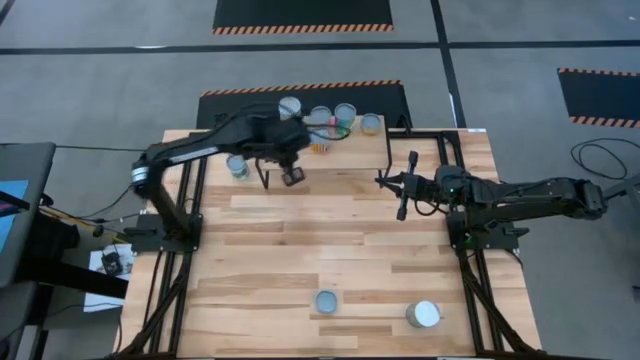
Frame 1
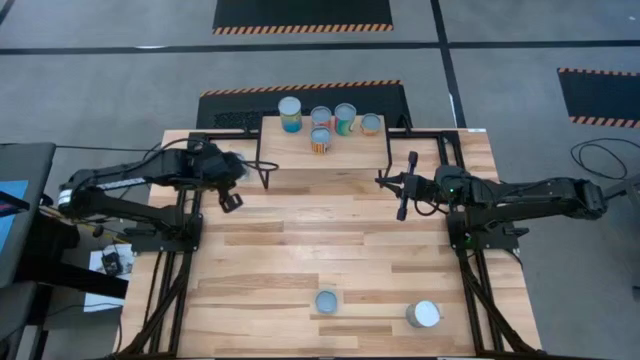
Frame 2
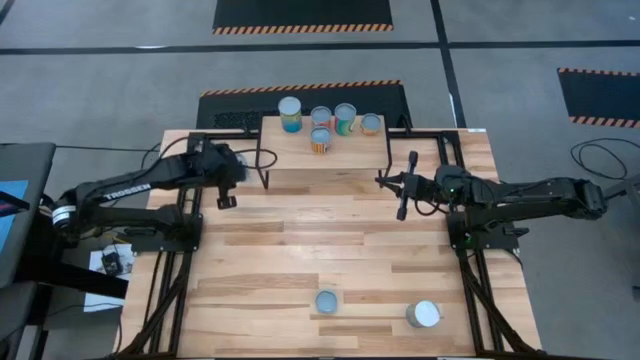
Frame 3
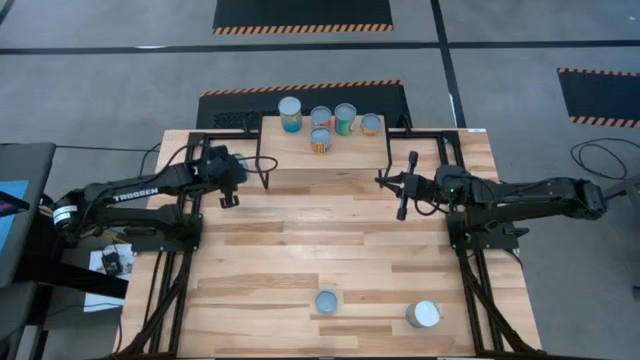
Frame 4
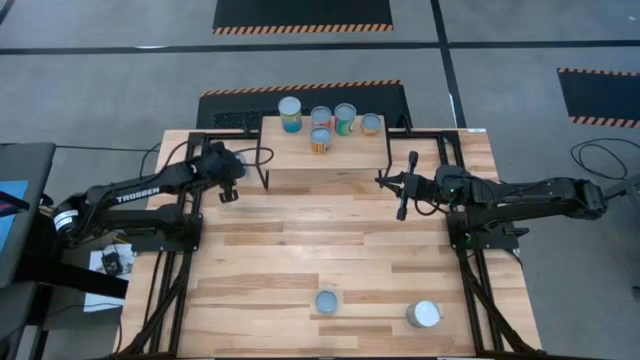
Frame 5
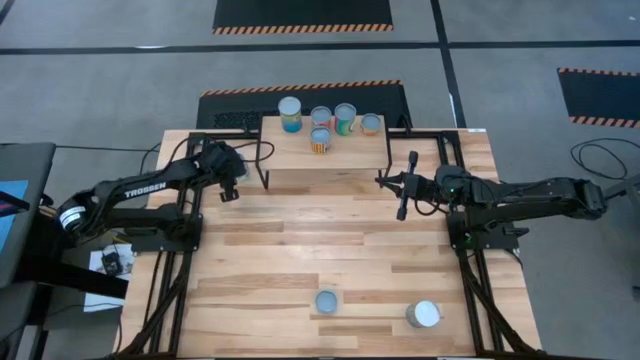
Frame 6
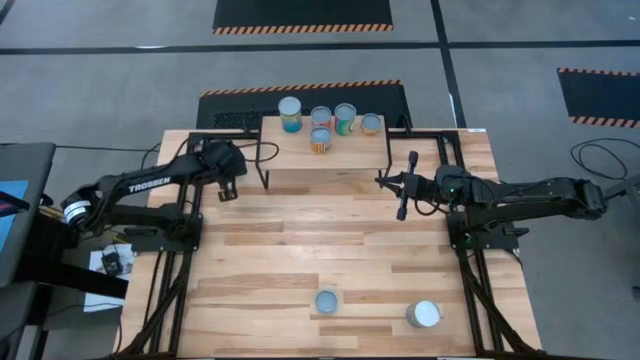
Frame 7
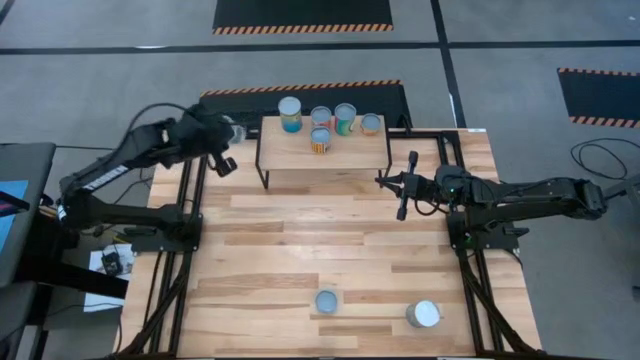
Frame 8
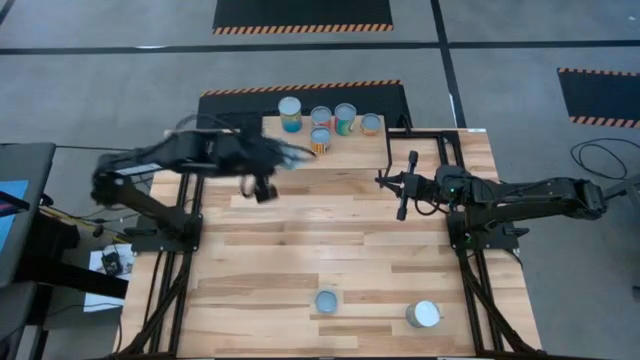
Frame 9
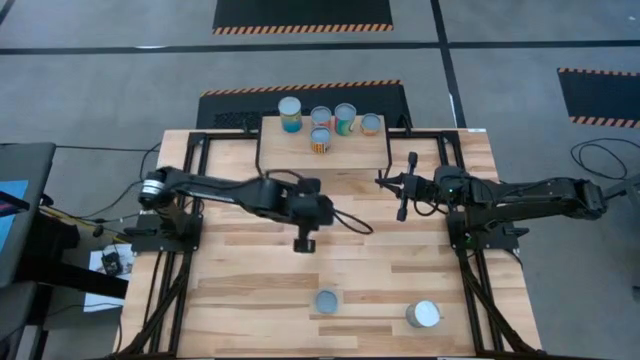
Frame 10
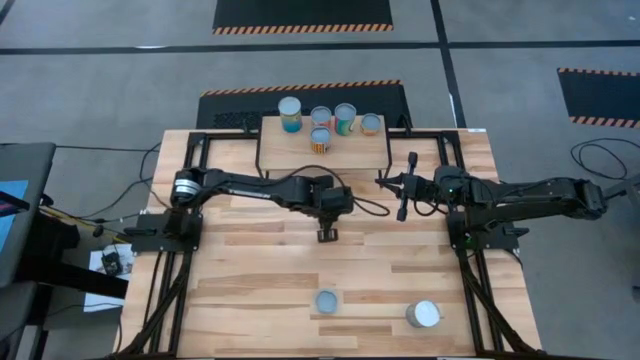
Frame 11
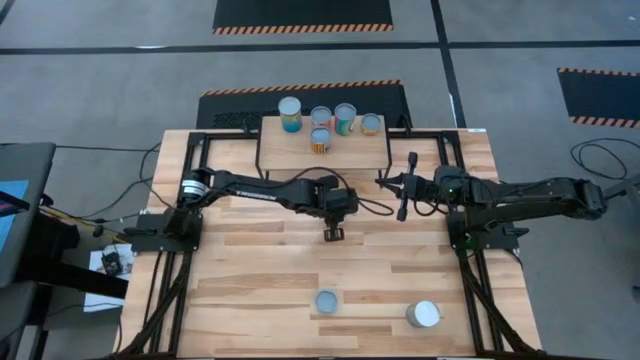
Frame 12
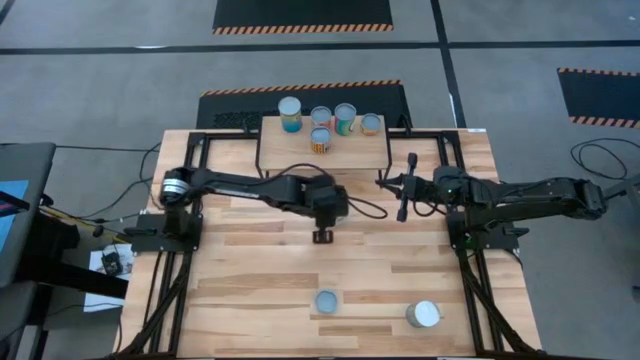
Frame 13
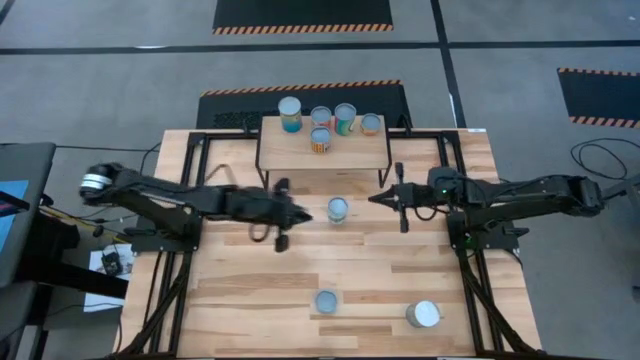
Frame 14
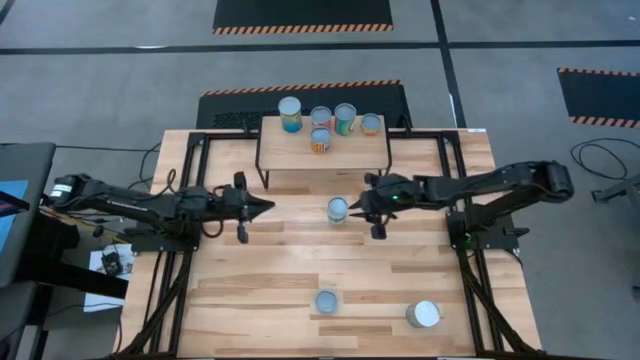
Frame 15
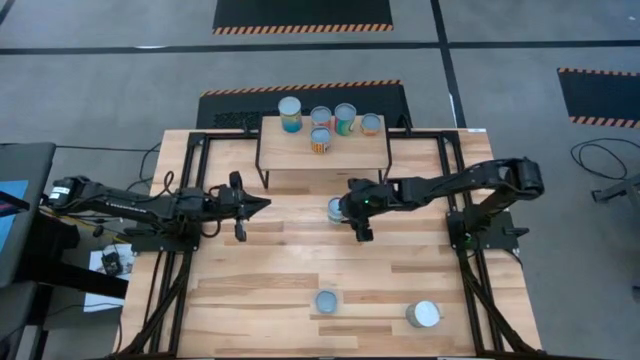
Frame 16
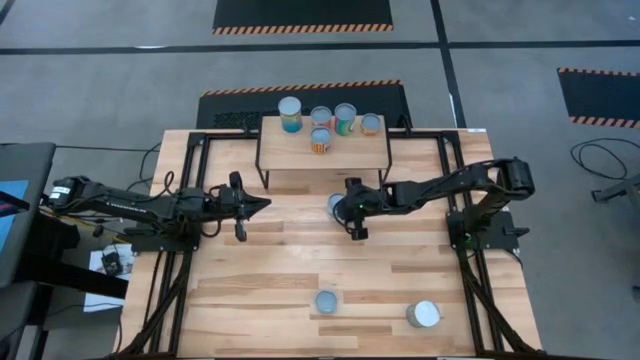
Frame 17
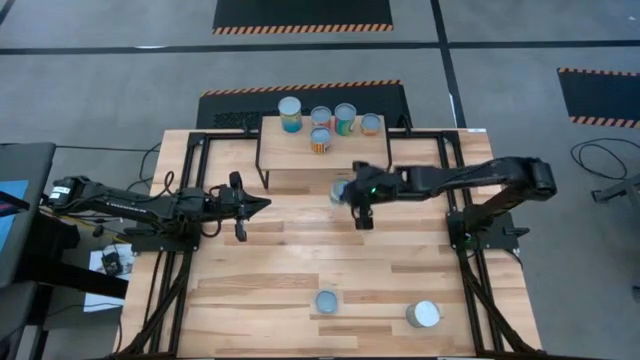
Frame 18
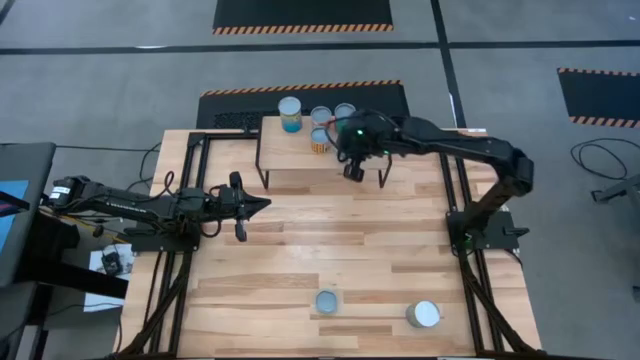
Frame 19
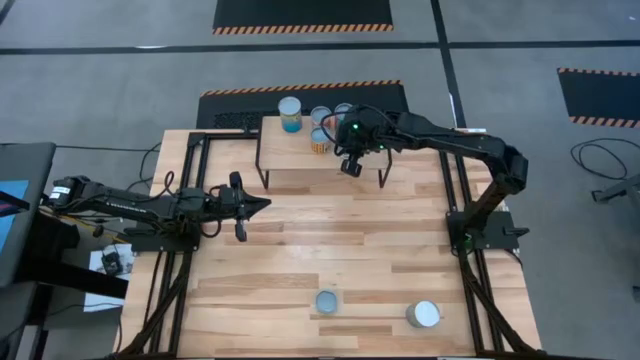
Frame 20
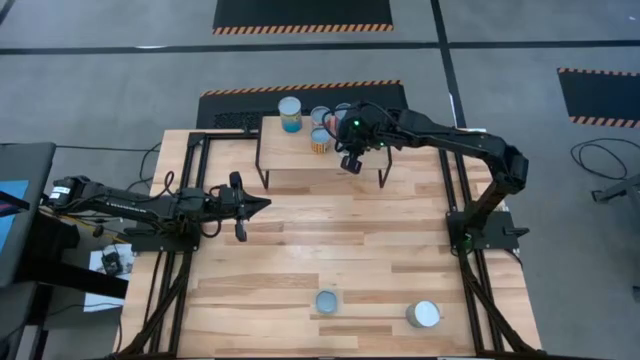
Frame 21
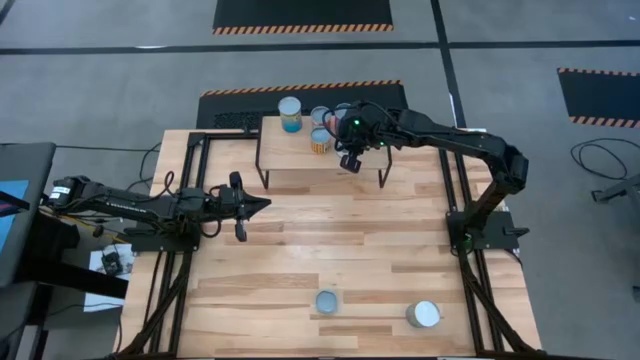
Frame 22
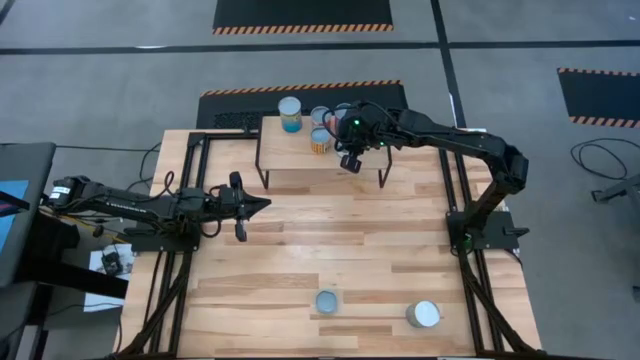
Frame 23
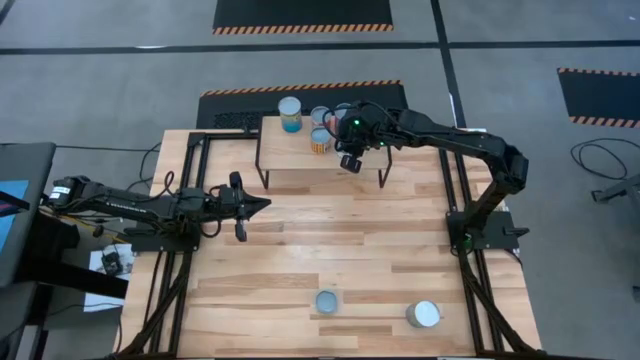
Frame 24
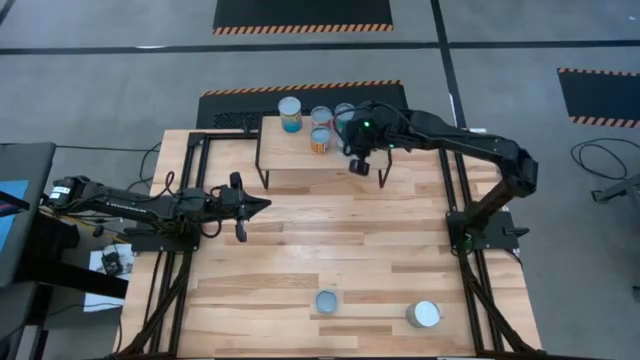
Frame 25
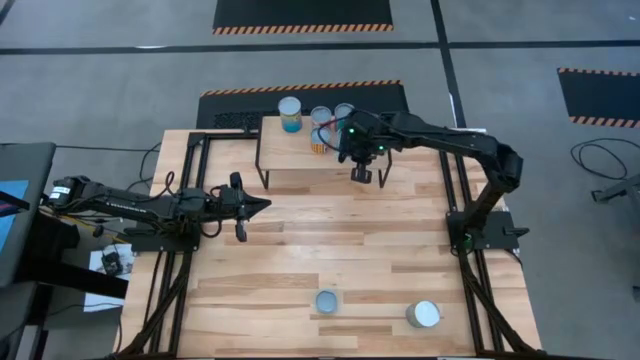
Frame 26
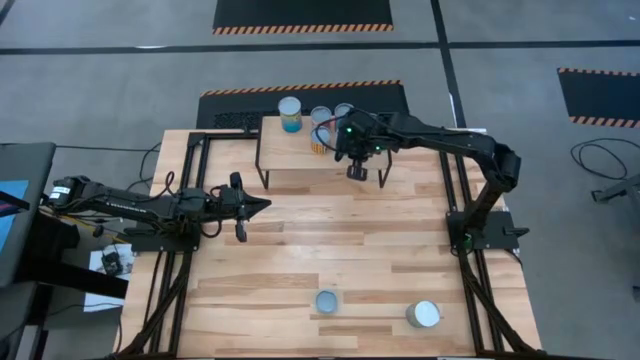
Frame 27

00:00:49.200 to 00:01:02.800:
Task: Pick and place cans onto a shelf
Put the canned mixed vegetables on the shelf

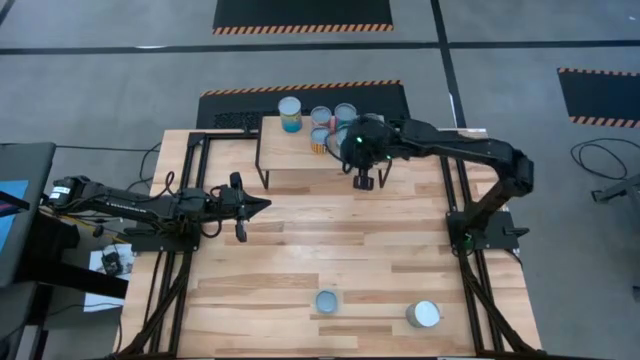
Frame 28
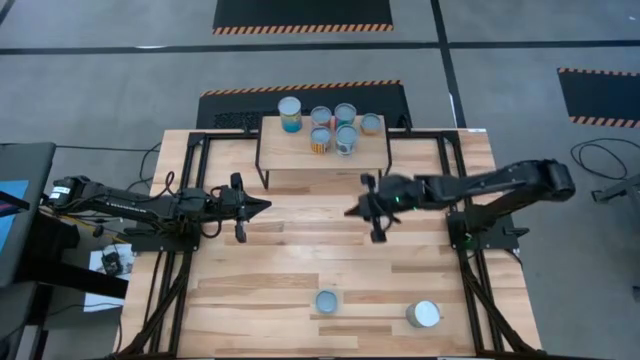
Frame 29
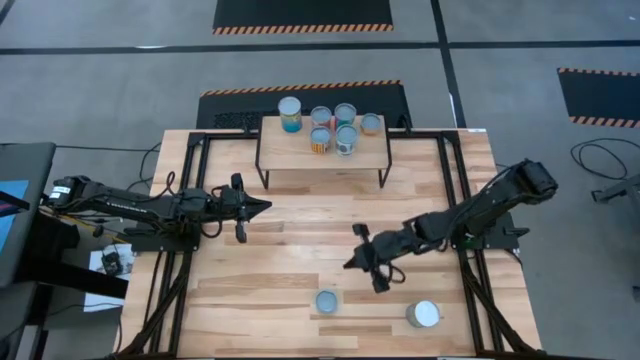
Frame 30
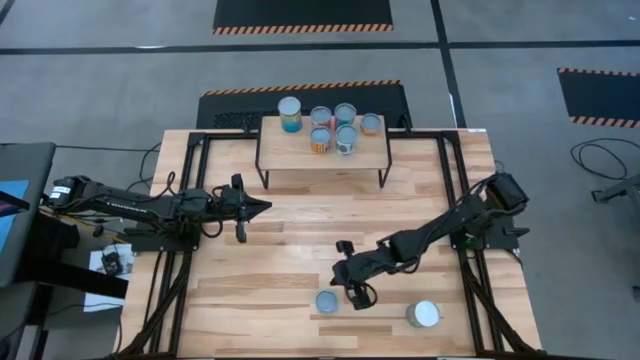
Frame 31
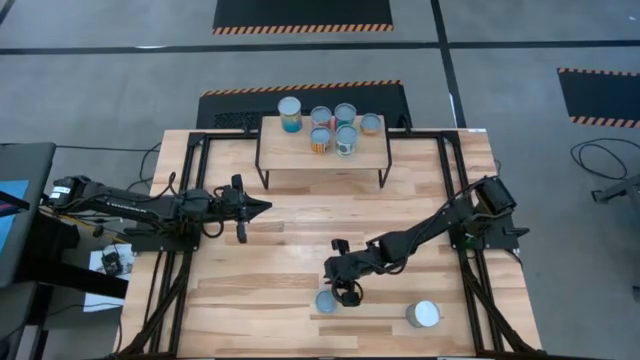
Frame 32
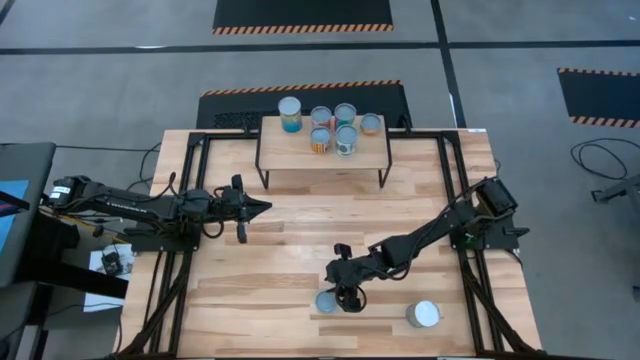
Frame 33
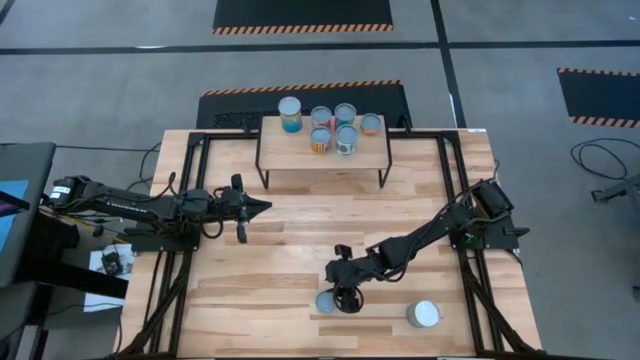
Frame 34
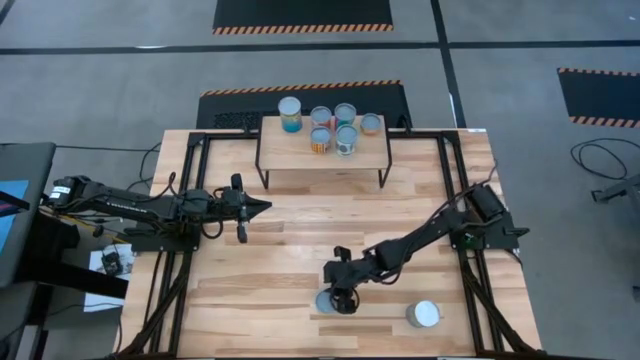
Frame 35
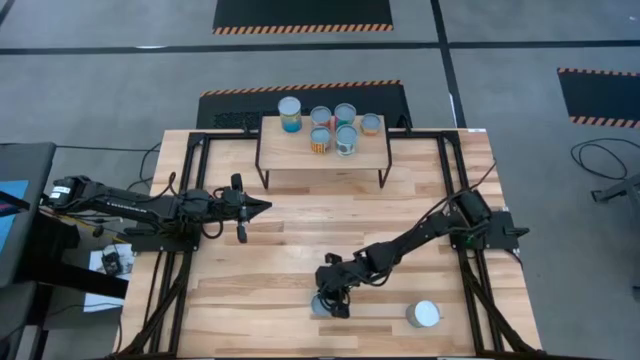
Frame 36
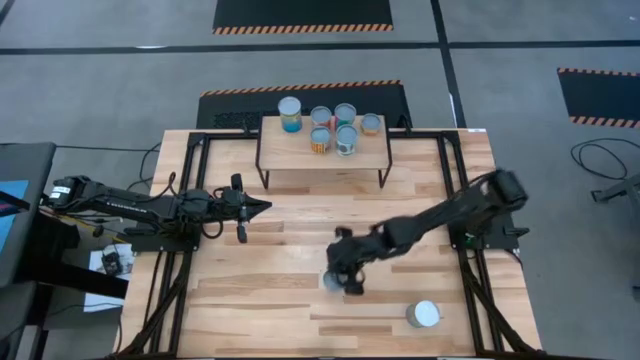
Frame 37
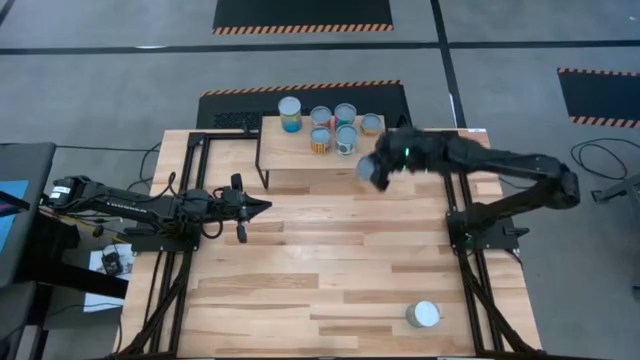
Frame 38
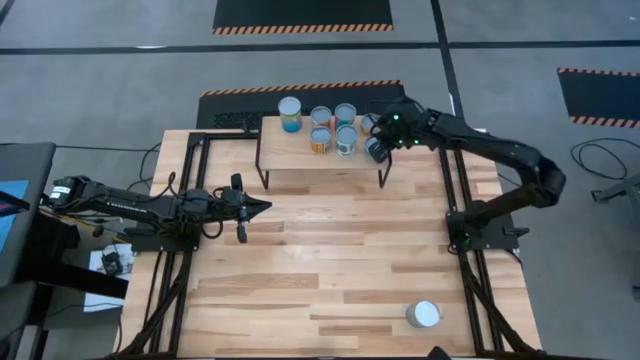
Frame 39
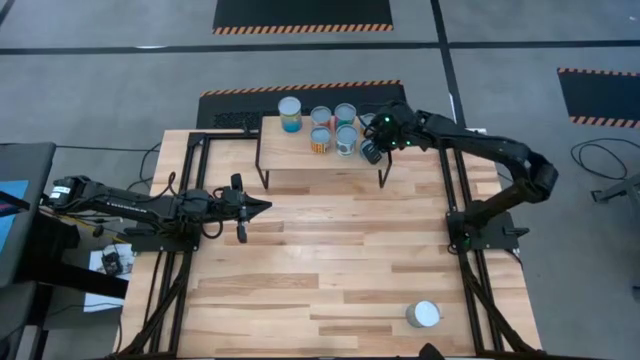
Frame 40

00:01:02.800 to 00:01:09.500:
Put the canned tuna on the shelf

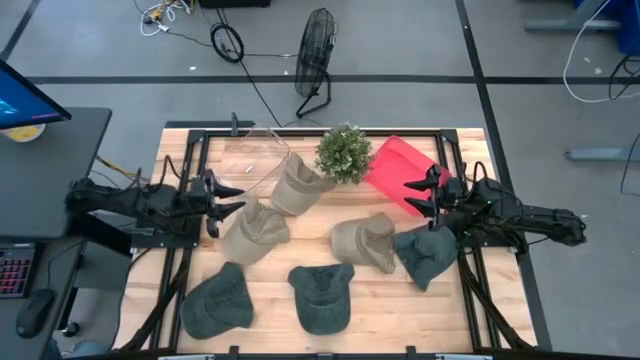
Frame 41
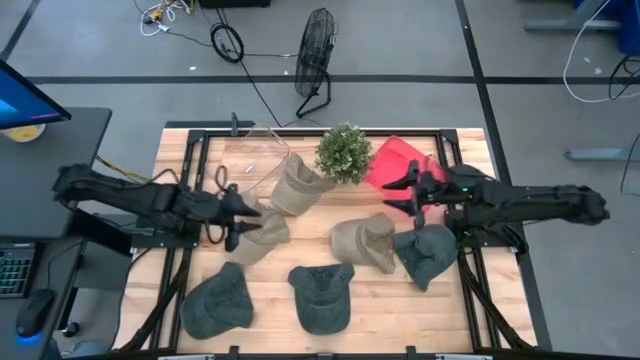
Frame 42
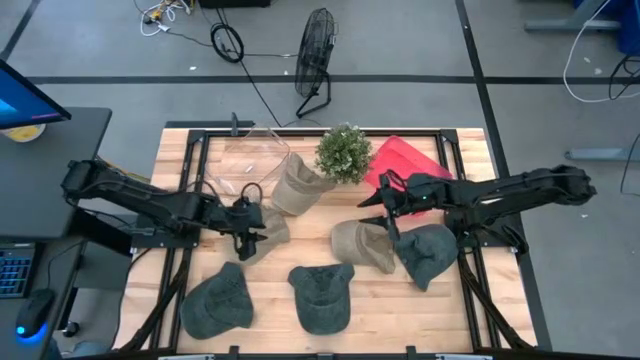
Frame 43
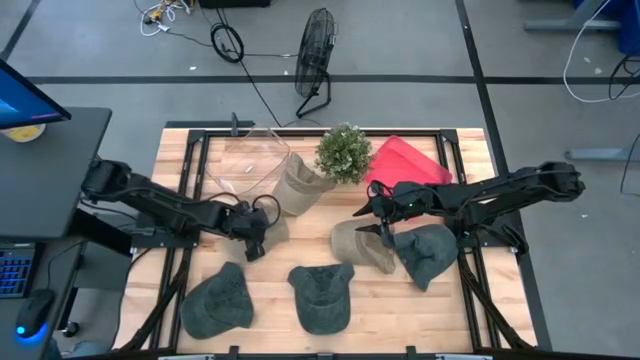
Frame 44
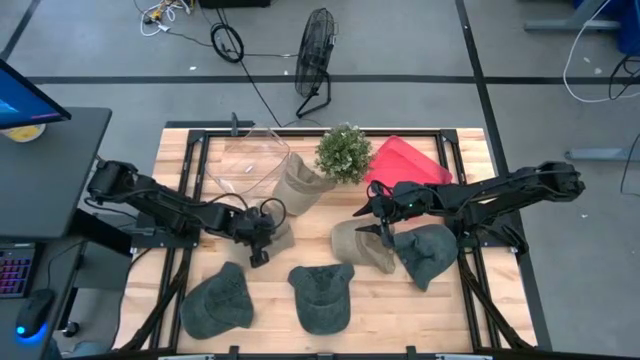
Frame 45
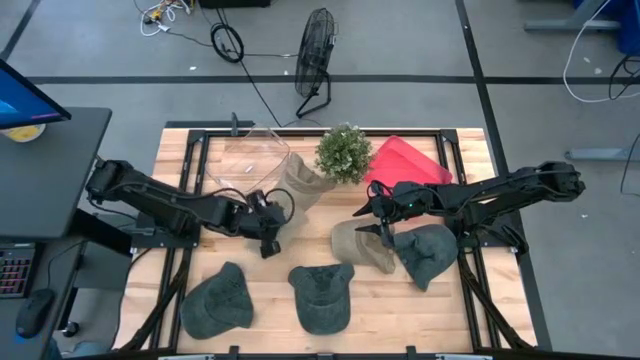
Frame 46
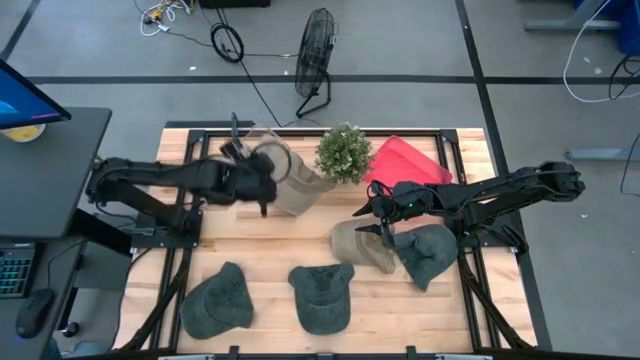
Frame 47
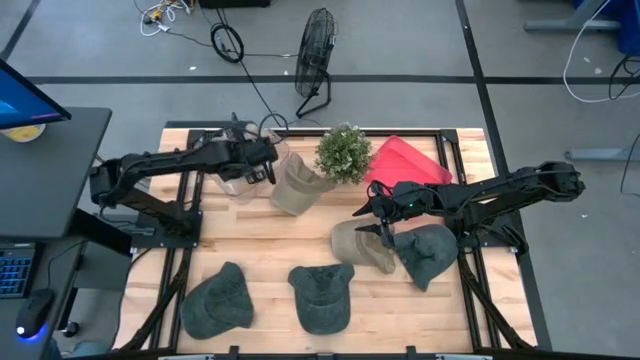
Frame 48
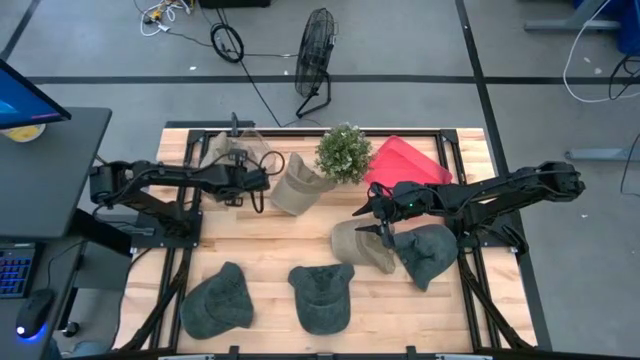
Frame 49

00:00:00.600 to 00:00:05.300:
Task: Pick & Place hat
Put the top brown cap into the transparent bin
